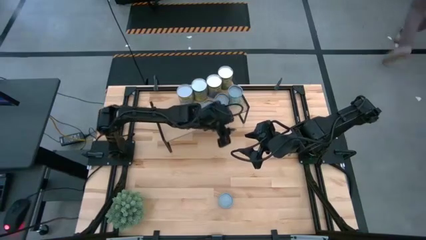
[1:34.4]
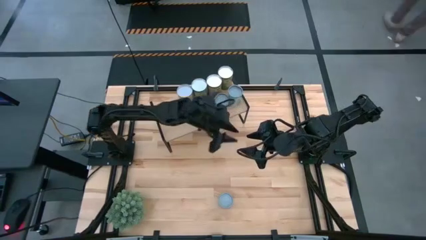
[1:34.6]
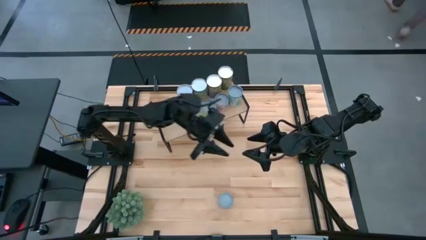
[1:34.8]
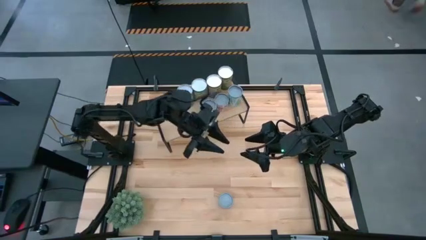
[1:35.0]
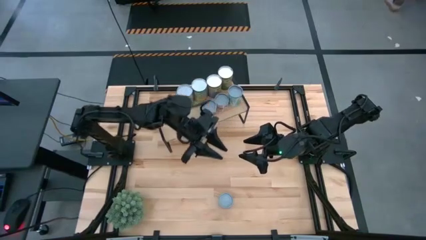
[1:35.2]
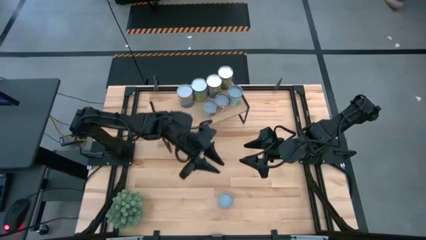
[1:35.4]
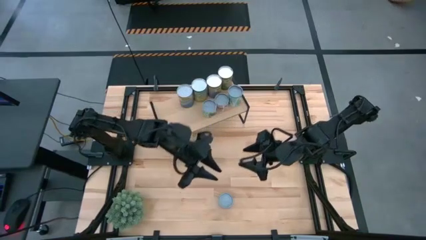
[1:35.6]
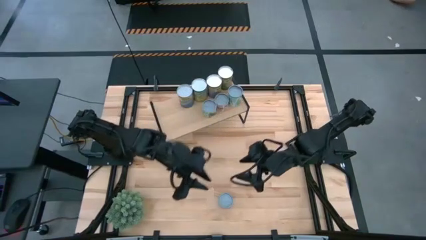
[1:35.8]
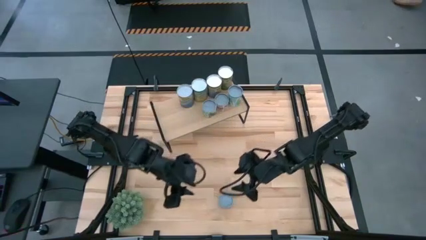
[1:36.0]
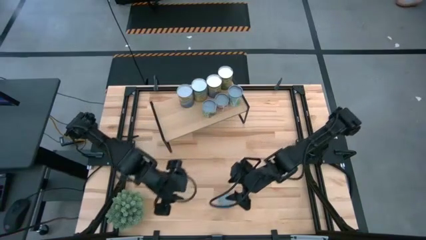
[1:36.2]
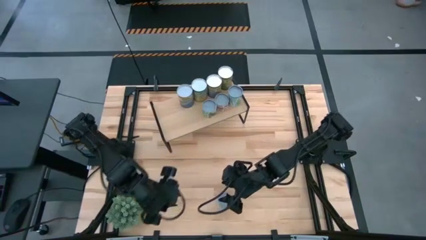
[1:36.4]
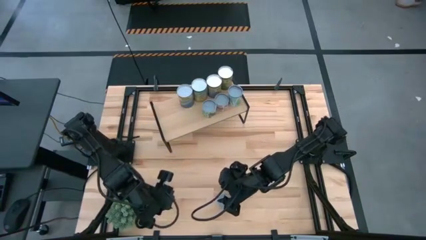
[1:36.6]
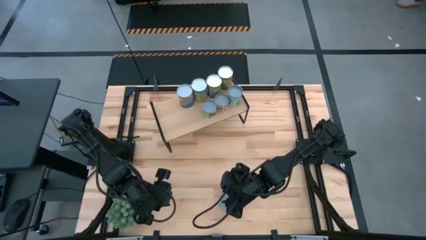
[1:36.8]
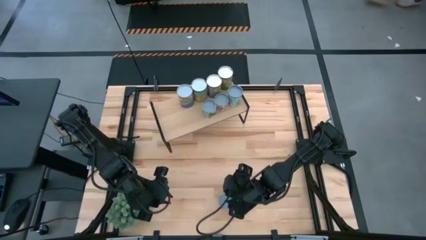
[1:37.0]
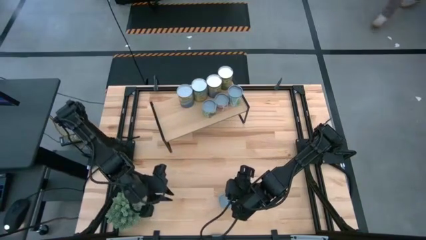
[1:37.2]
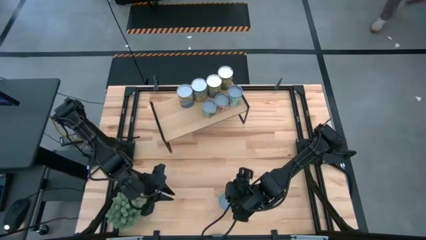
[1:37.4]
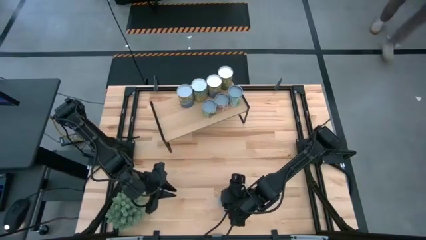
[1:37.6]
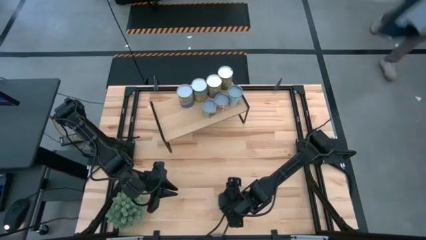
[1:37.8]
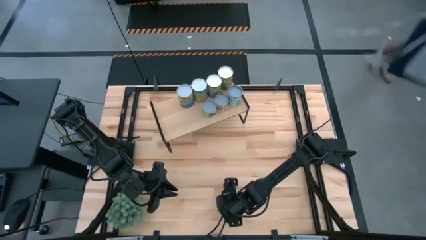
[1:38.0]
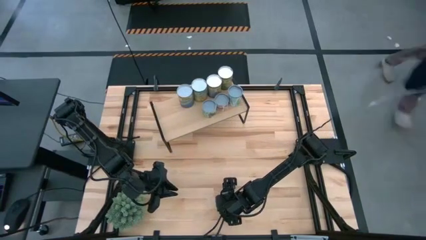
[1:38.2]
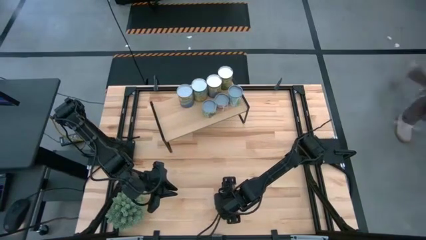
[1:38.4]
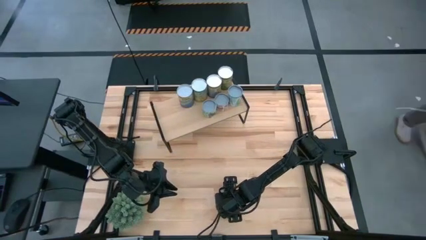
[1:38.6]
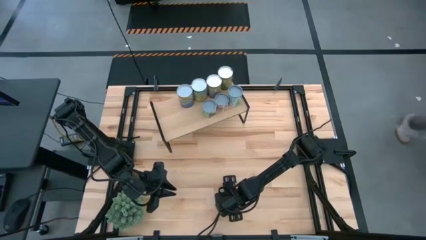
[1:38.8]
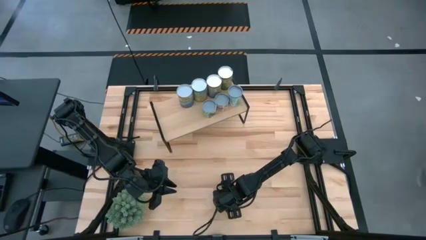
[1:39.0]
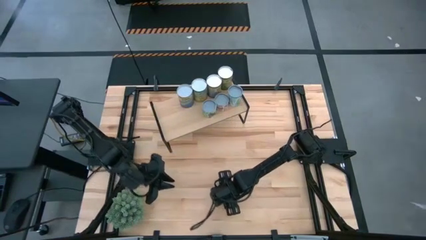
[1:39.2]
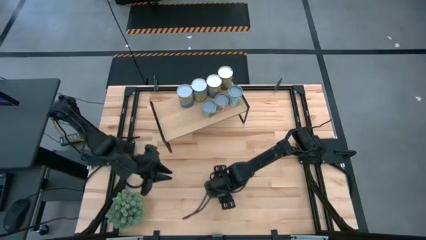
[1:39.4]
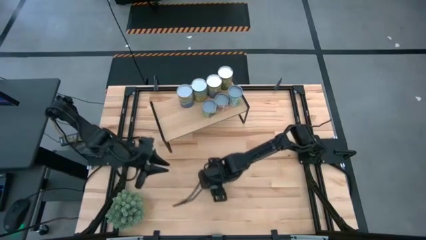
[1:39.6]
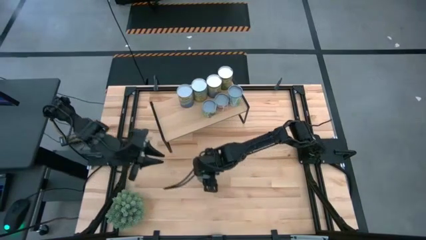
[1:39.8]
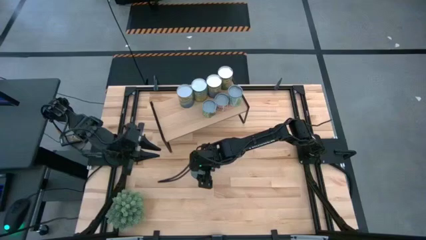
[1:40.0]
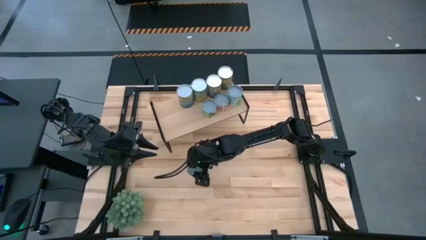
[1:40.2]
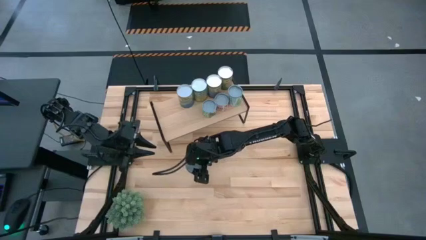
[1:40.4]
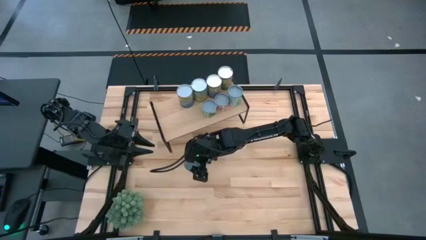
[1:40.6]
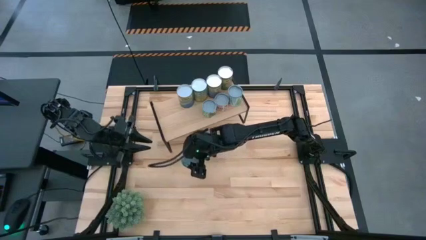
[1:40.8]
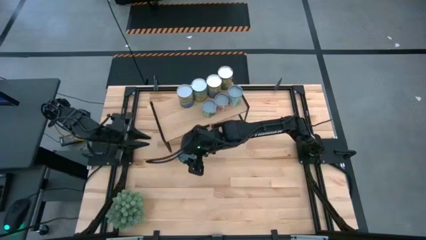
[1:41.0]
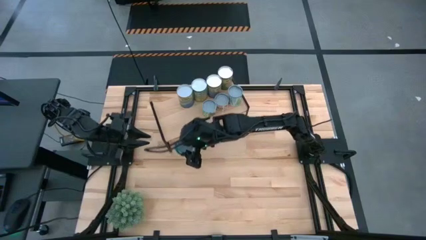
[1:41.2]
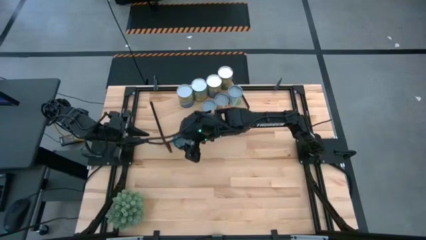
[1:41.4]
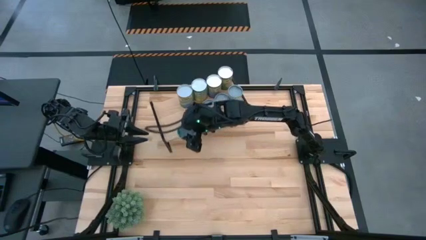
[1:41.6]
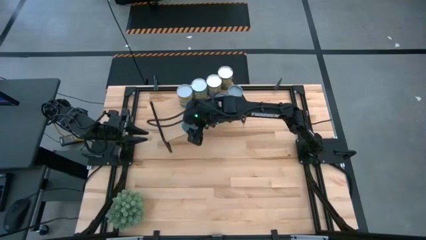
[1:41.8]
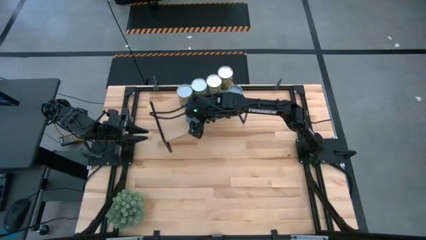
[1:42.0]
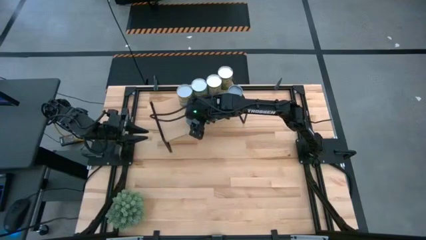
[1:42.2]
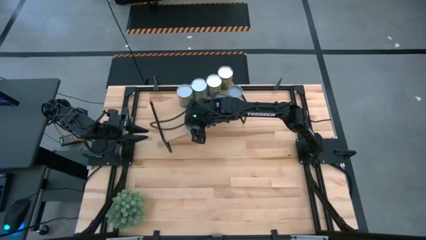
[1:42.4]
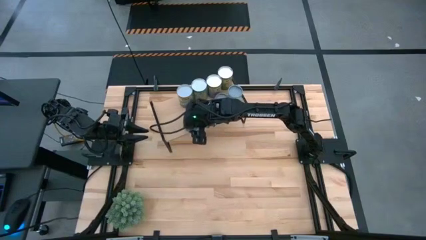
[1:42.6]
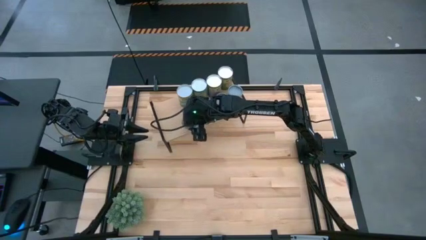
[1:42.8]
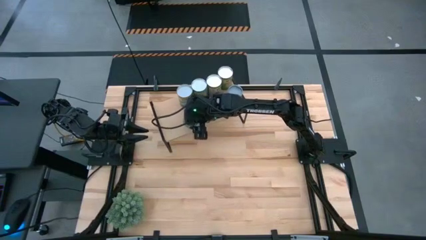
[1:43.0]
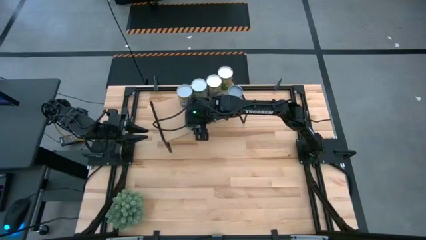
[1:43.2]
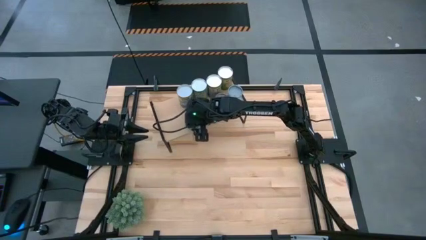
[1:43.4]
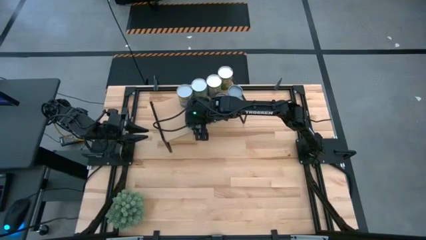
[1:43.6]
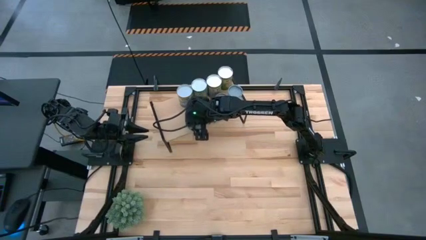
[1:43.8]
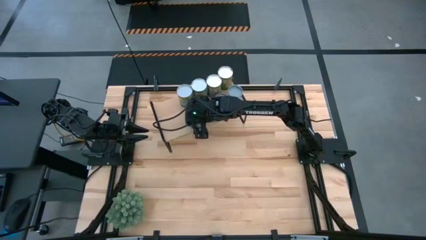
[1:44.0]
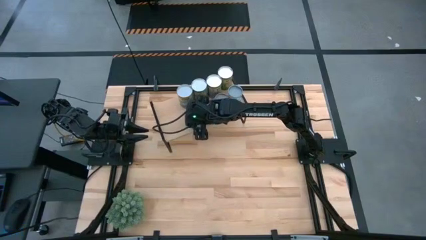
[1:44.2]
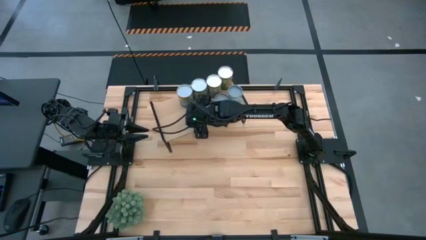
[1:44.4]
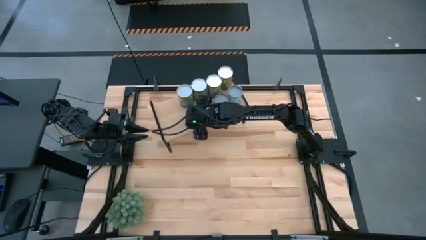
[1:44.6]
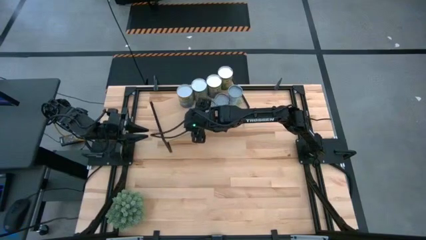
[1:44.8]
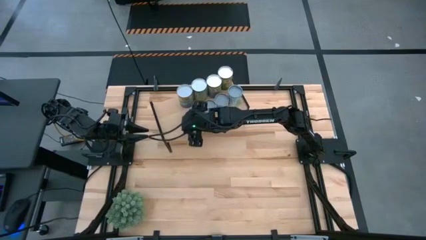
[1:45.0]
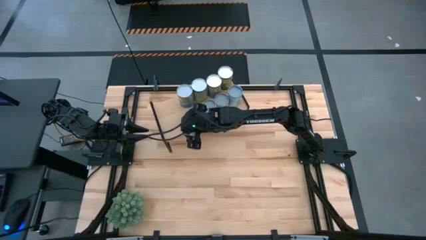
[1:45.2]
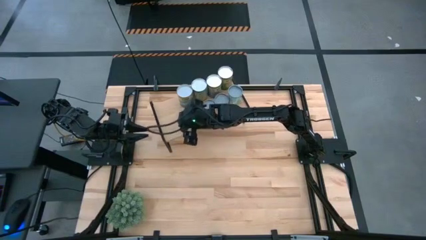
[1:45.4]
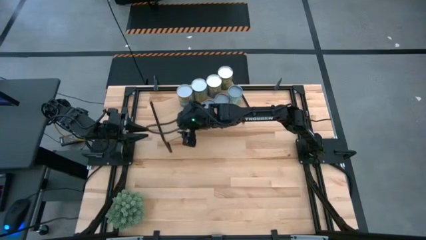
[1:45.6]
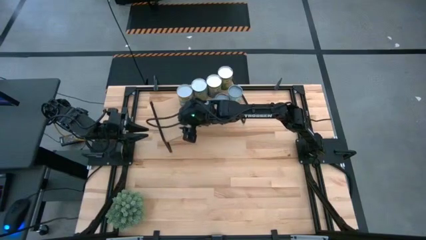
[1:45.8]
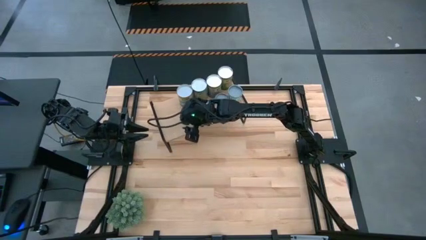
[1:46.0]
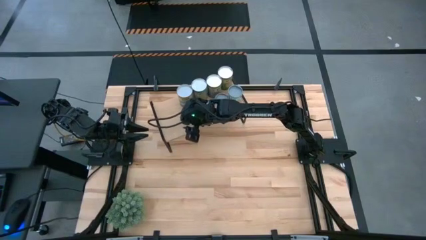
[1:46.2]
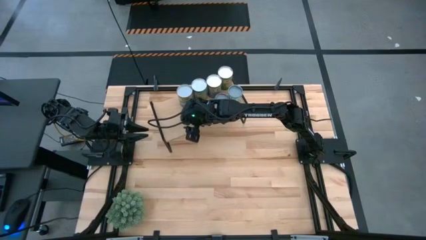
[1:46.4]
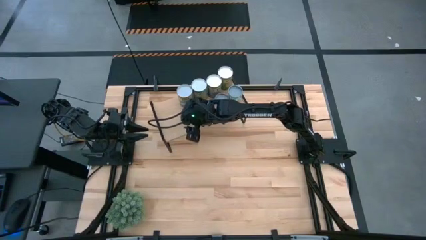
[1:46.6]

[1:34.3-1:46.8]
Task: Pick and place cans onto a shelf
Put the canned tuna on the shelf
